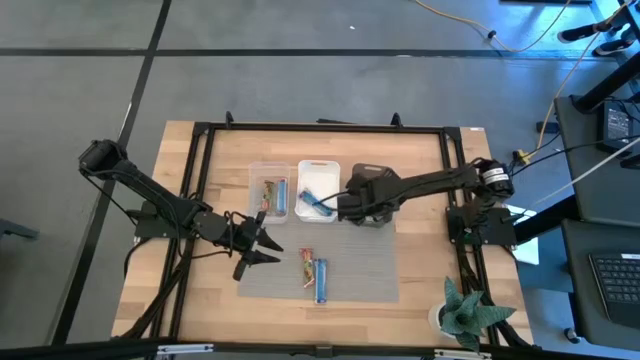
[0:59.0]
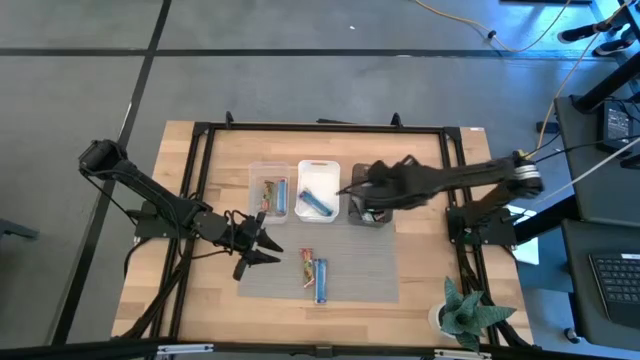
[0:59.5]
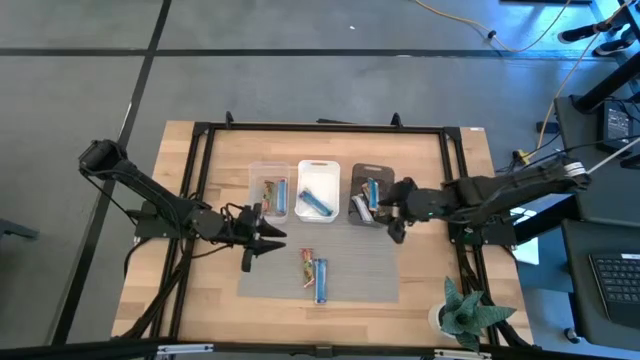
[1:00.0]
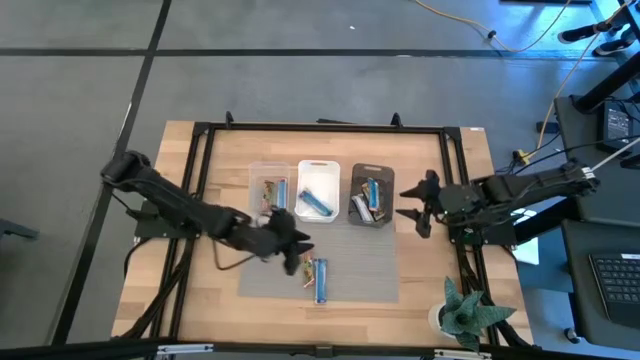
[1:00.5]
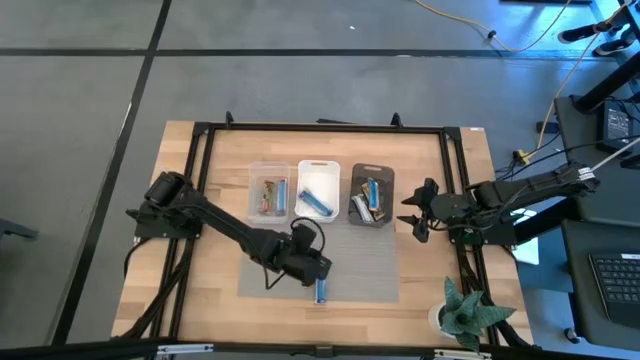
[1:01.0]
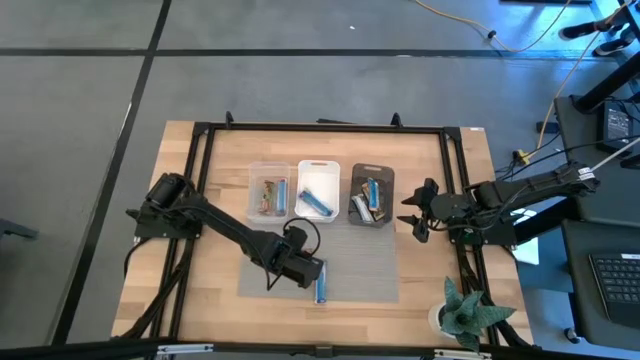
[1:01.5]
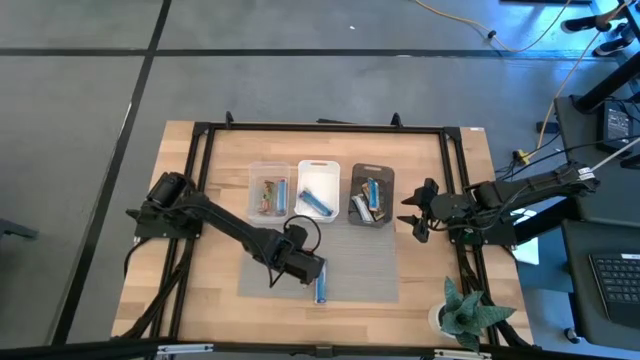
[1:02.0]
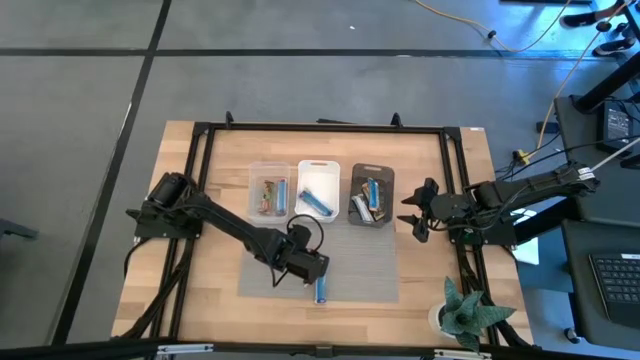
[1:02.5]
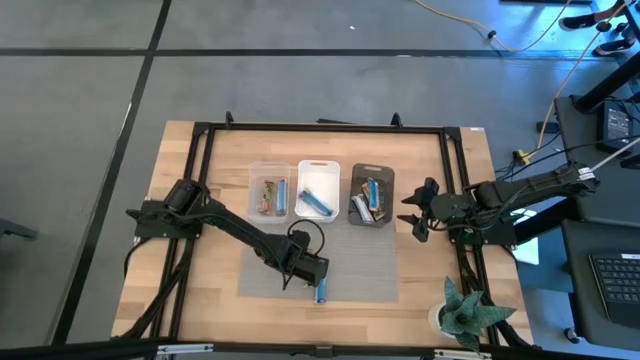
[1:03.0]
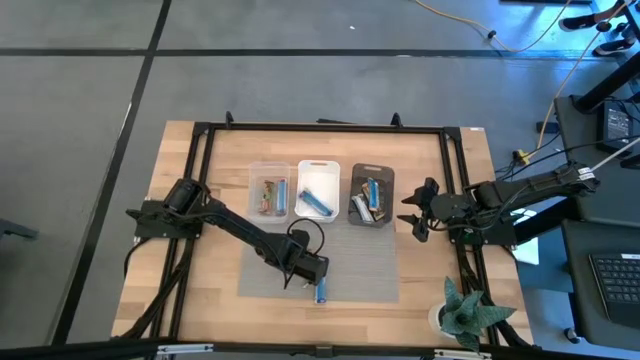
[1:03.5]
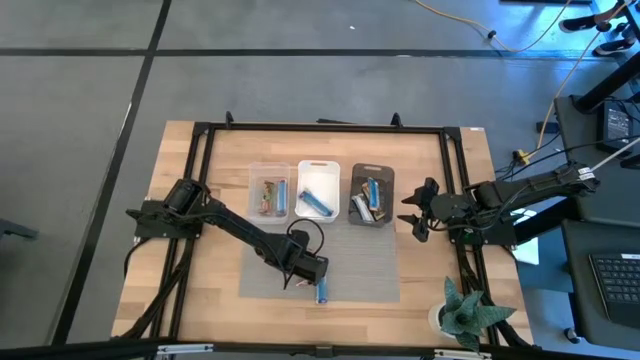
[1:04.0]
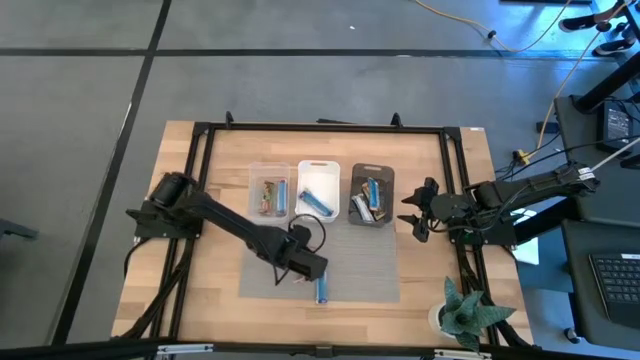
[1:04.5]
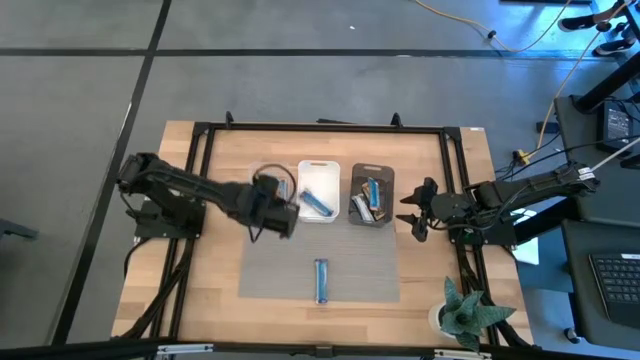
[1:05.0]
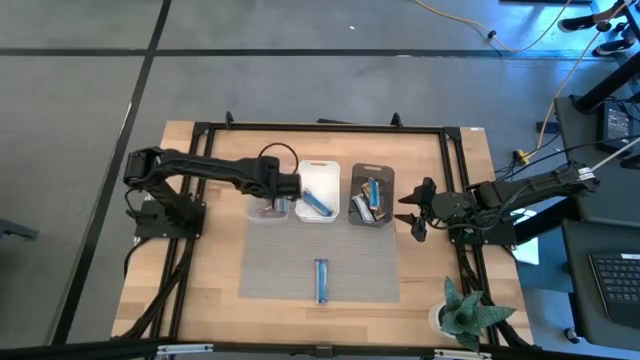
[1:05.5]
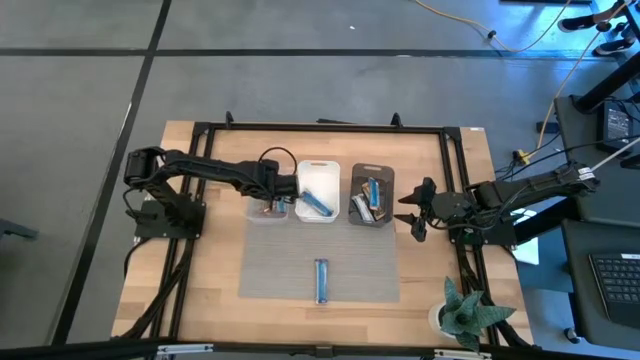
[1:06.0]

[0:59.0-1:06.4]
Task: Pick and place Granola Bars by type
Put the red granola bar into the transparent bin

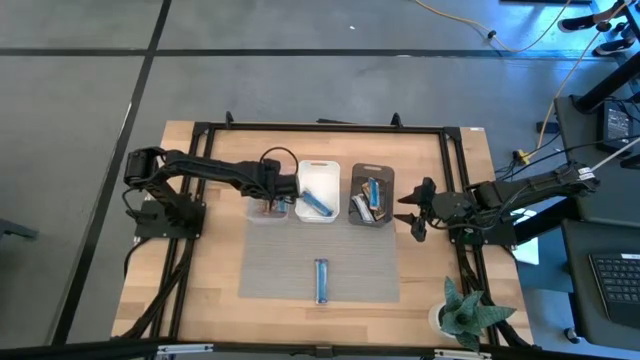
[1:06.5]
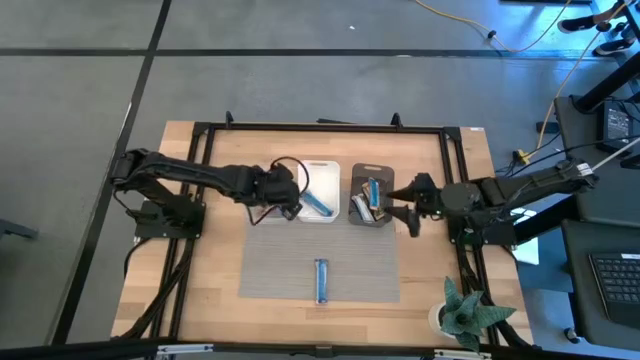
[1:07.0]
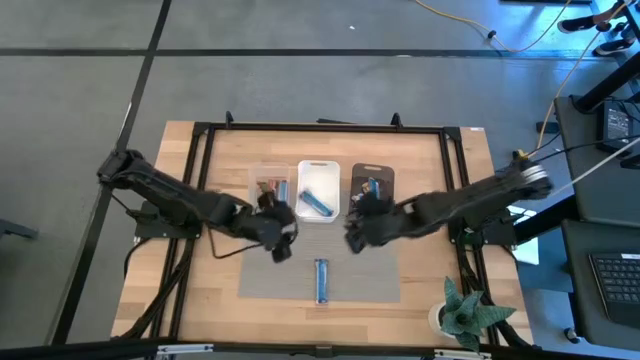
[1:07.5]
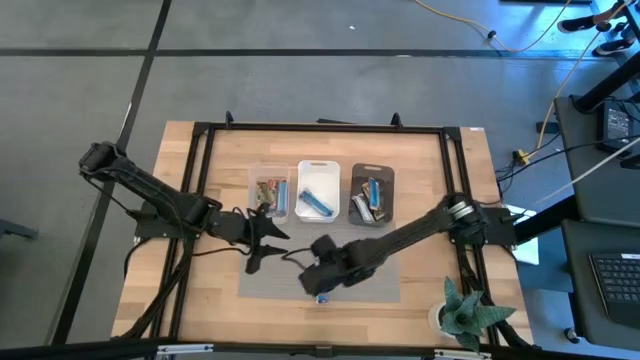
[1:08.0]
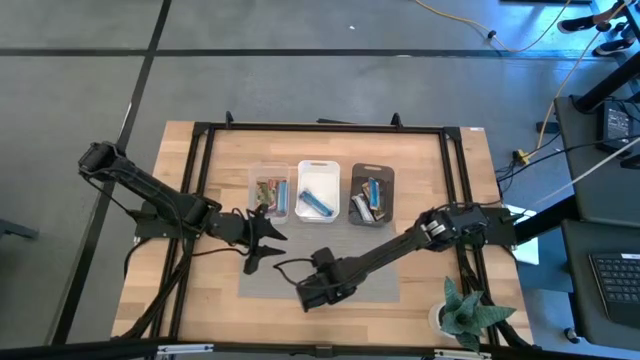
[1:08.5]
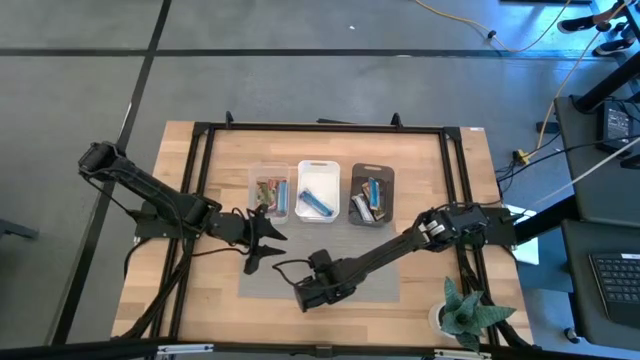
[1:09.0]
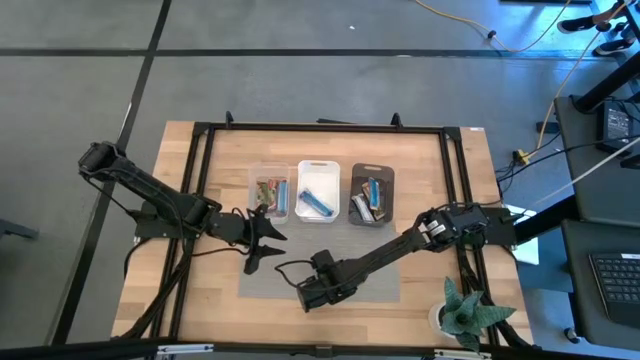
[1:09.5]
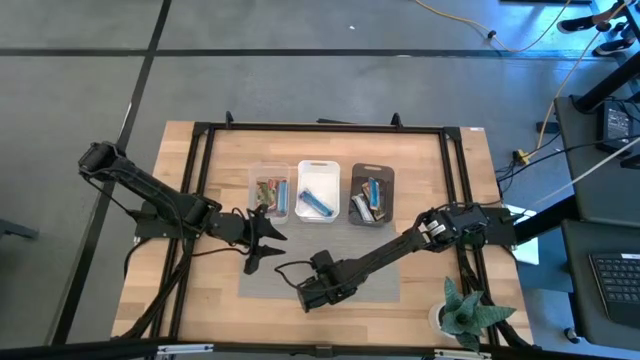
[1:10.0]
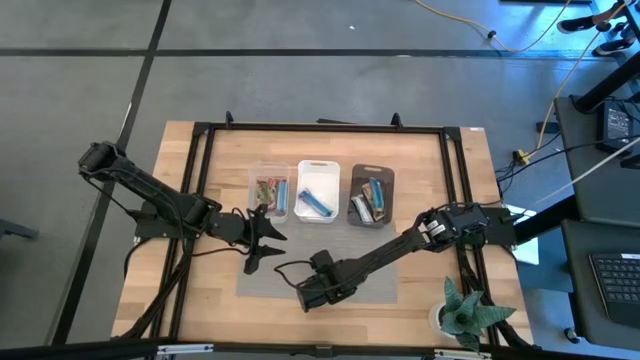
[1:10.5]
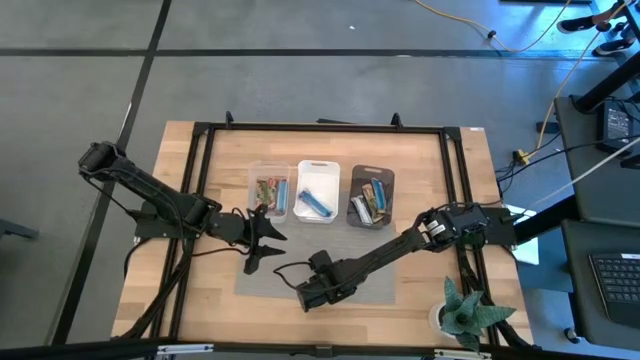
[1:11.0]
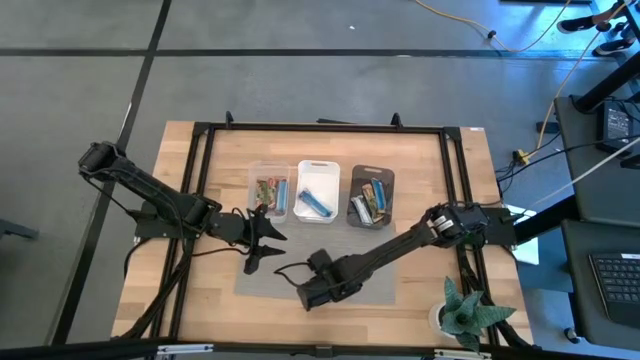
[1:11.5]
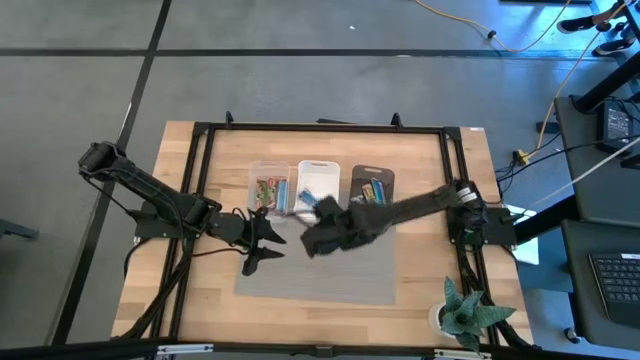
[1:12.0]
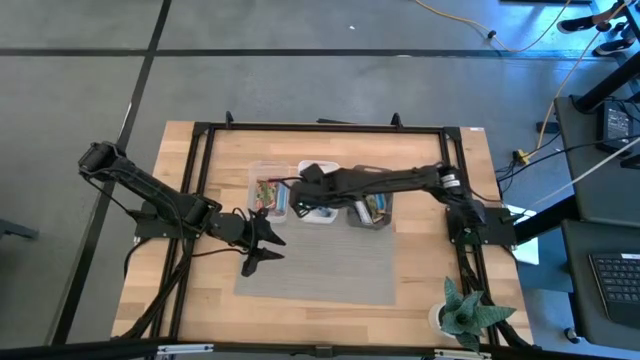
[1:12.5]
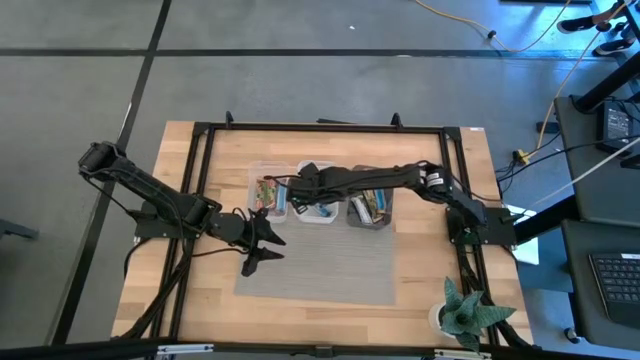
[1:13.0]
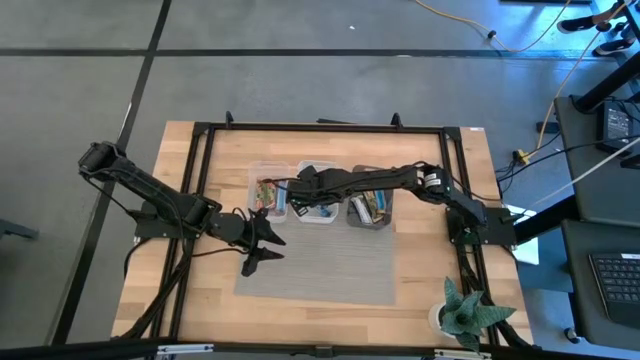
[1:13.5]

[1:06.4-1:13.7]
Put the blue granola bar into the white bin

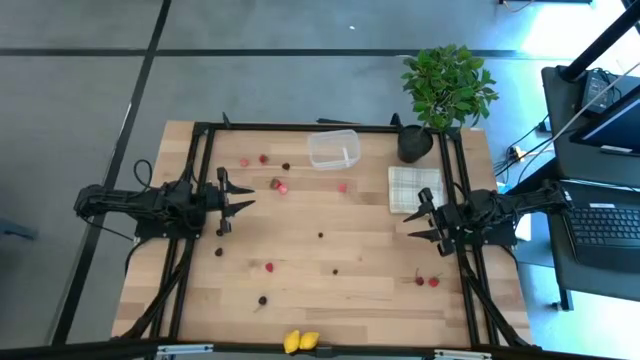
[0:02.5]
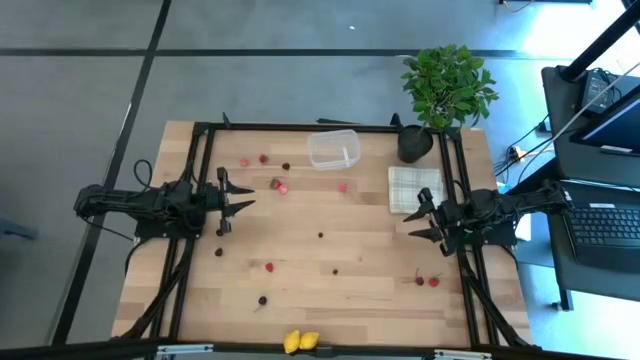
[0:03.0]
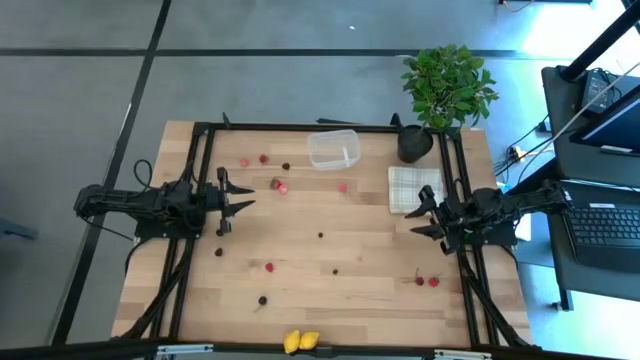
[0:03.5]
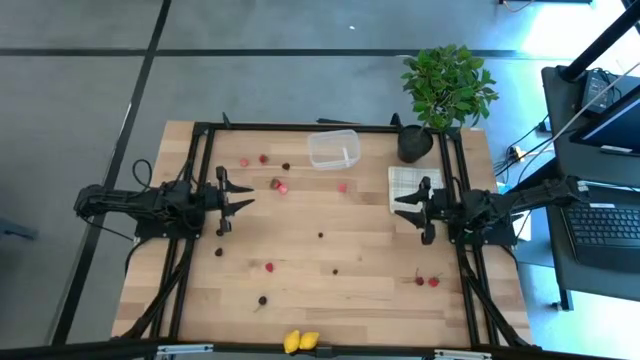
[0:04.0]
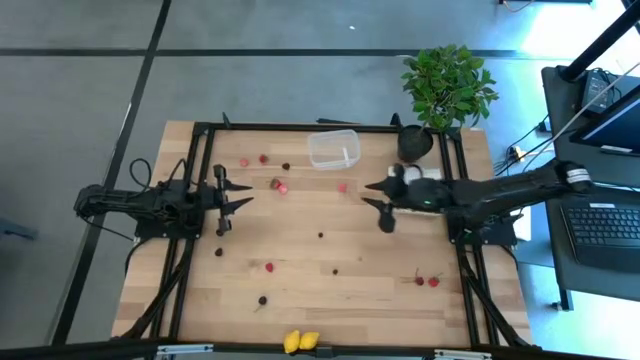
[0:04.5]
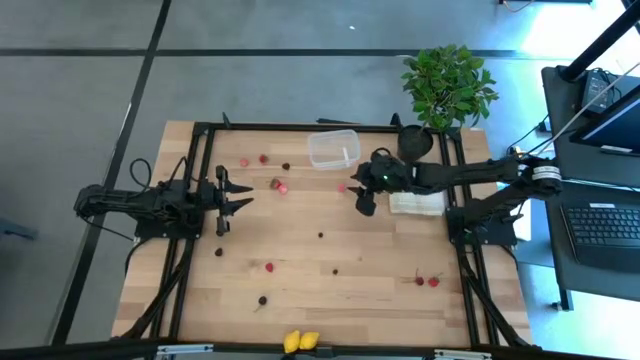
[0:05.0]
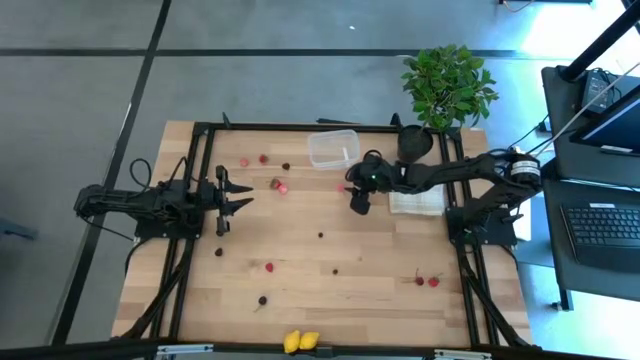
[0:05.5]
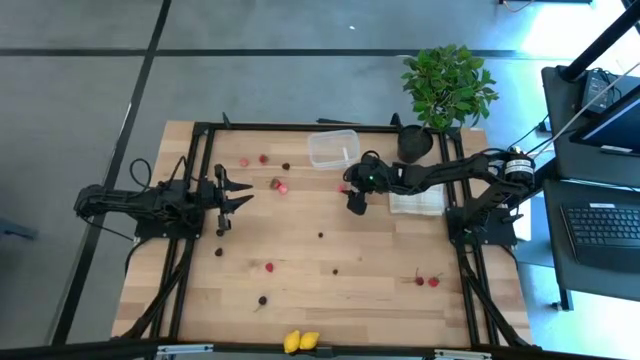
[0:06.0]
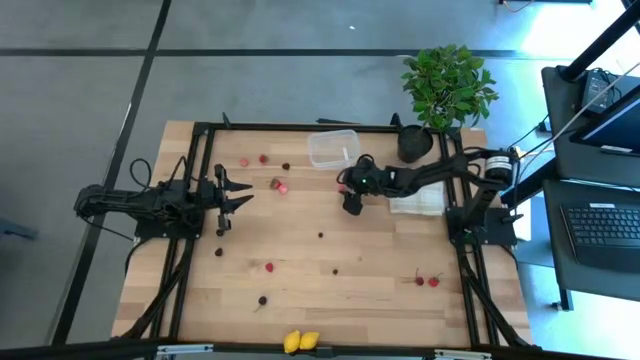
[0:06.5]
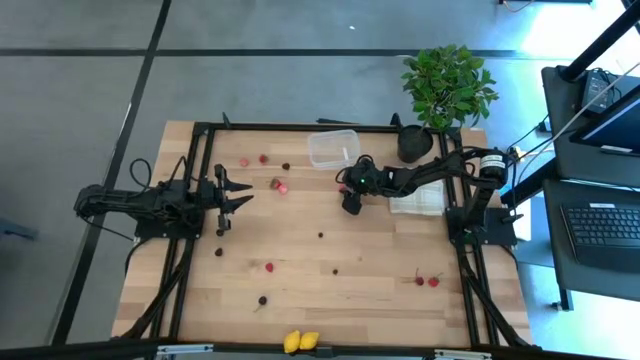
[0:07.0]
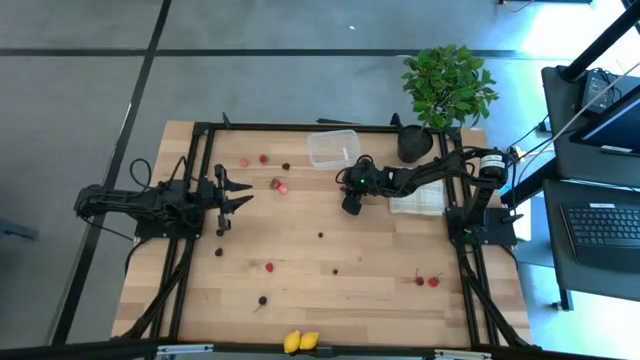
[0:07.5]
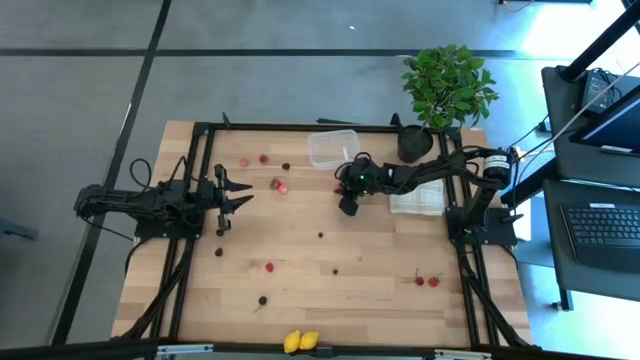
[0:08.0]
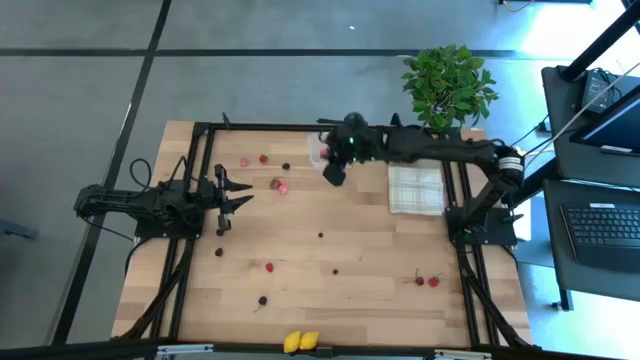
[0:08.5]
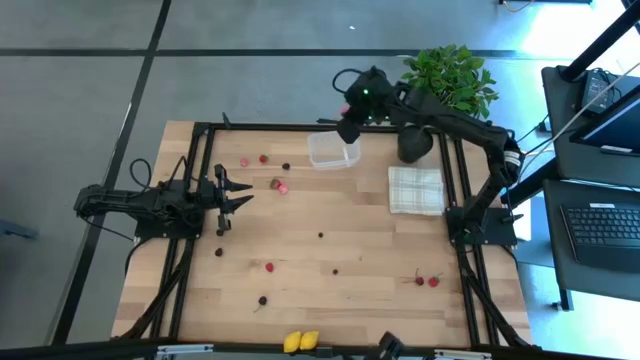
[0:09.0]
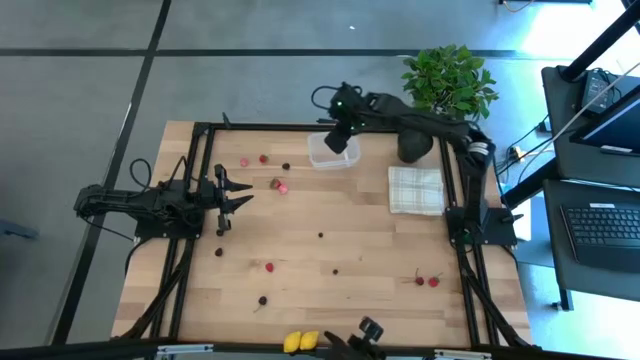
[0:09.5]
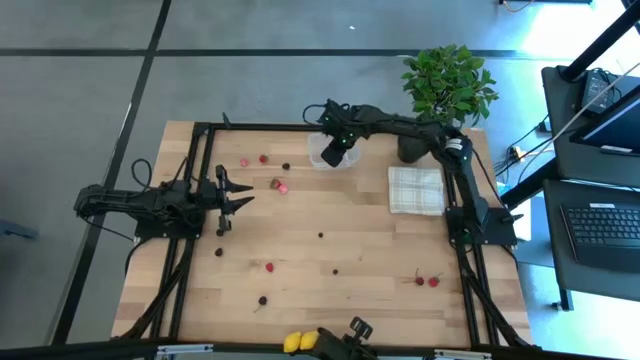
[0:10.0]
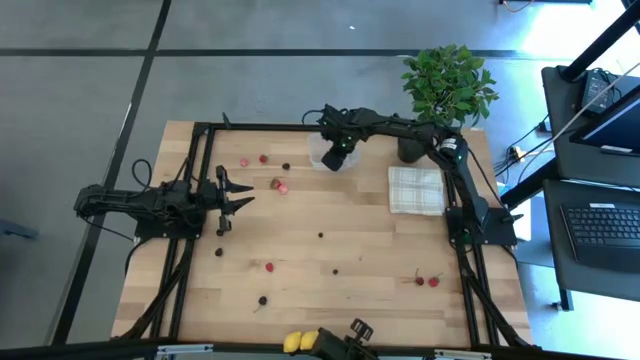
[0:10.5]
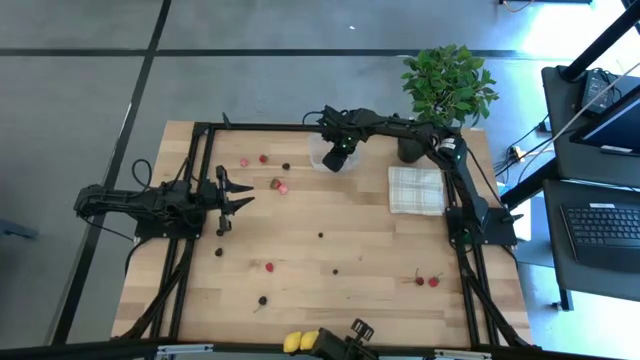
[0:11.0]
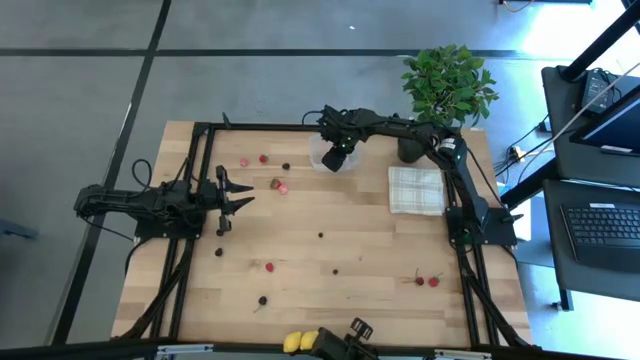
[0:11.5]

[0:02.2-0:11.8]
Task: Pick and placing Produce into tupperware
Put the bottom right peach into the transparent container
